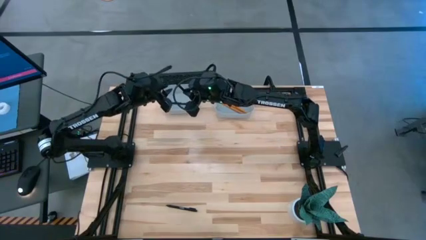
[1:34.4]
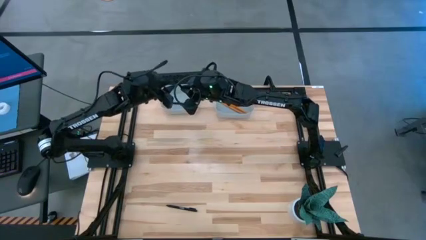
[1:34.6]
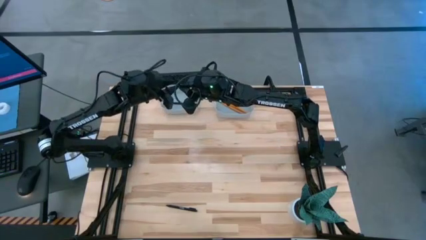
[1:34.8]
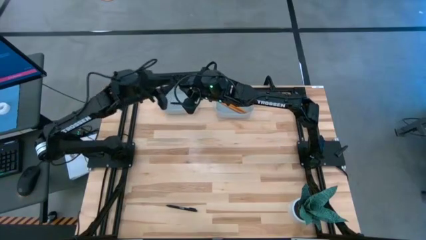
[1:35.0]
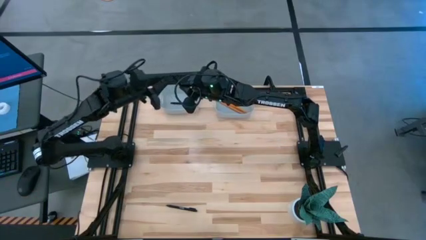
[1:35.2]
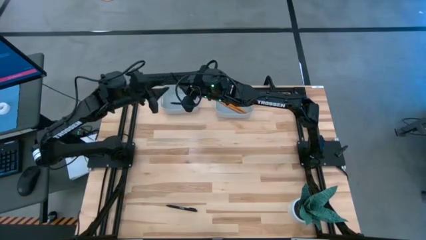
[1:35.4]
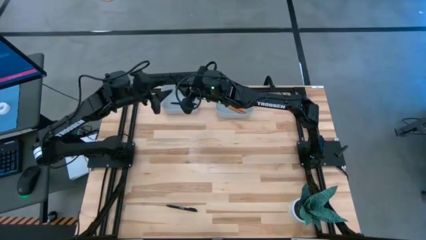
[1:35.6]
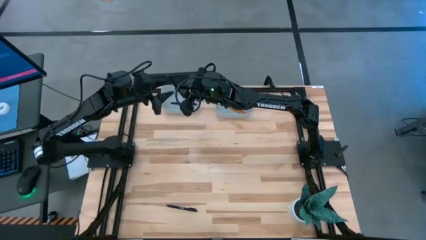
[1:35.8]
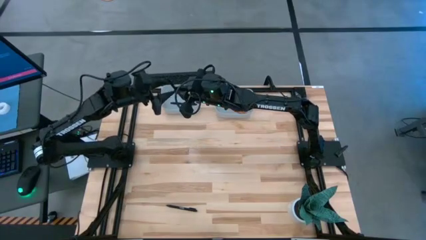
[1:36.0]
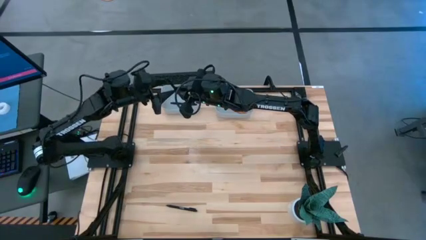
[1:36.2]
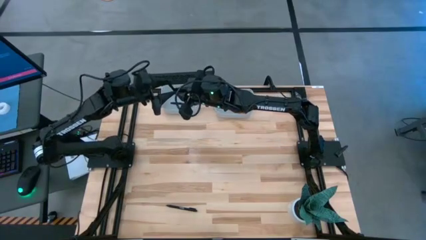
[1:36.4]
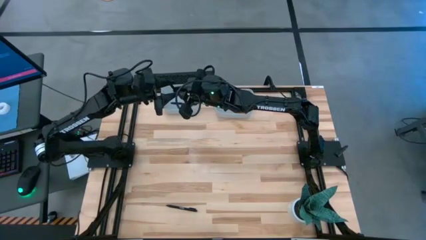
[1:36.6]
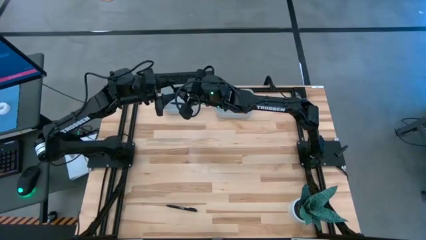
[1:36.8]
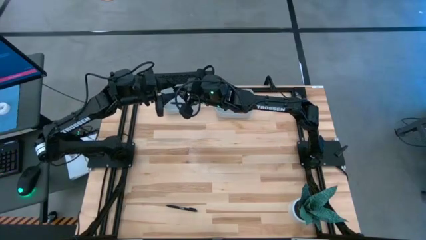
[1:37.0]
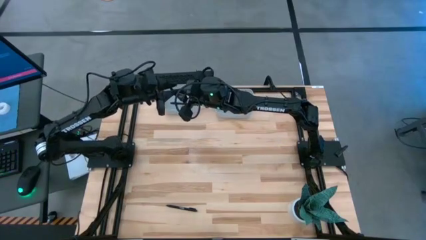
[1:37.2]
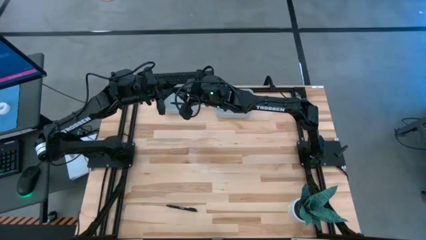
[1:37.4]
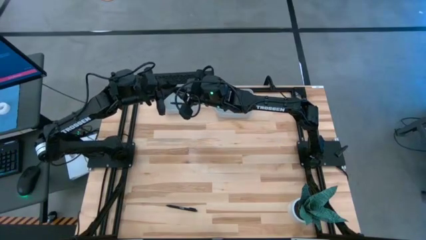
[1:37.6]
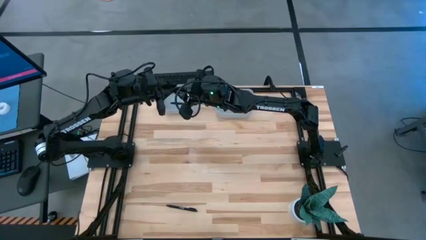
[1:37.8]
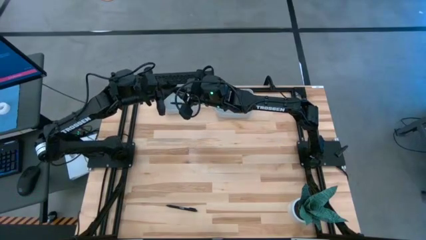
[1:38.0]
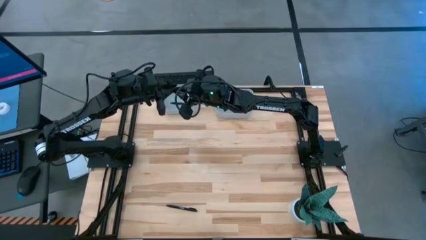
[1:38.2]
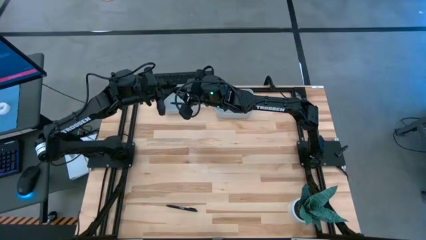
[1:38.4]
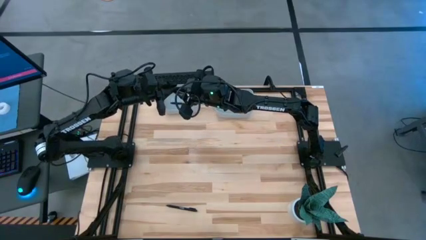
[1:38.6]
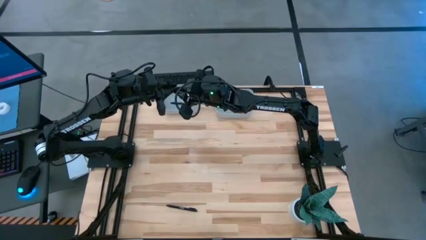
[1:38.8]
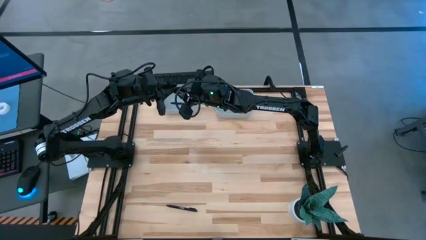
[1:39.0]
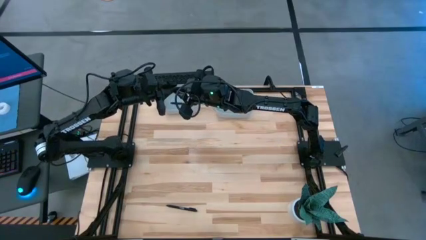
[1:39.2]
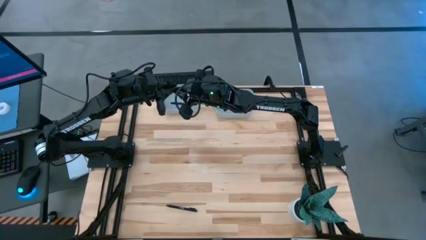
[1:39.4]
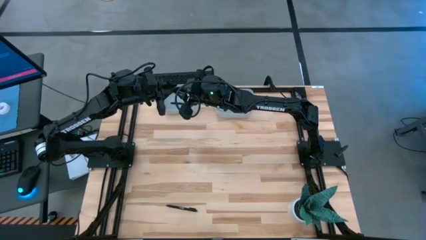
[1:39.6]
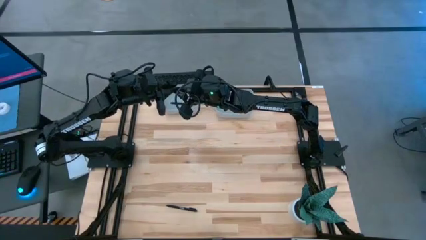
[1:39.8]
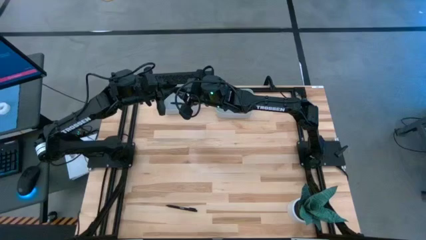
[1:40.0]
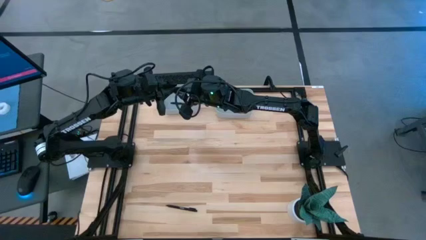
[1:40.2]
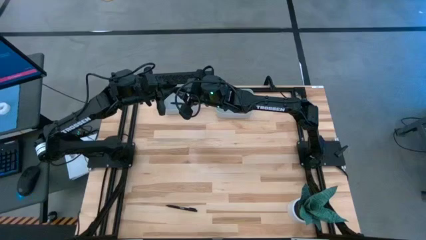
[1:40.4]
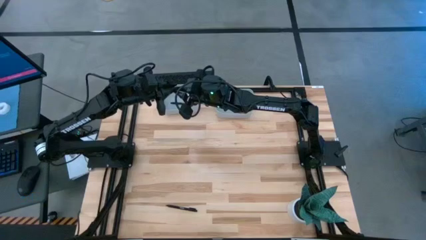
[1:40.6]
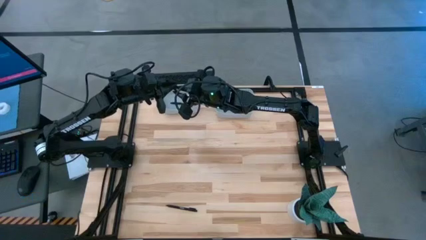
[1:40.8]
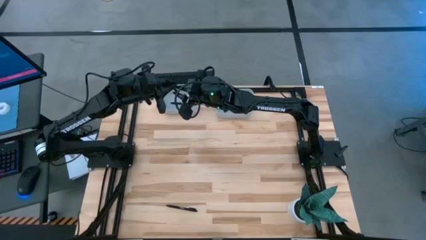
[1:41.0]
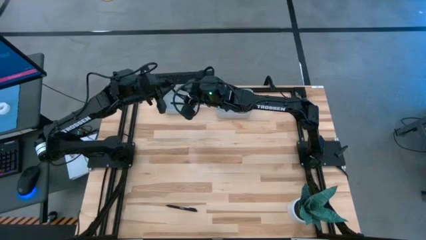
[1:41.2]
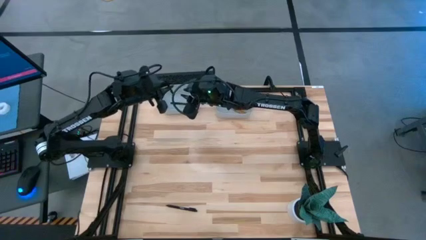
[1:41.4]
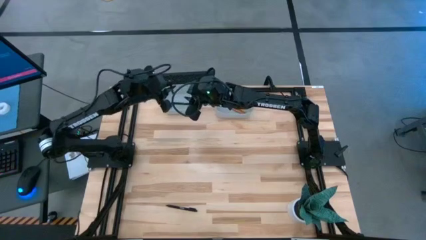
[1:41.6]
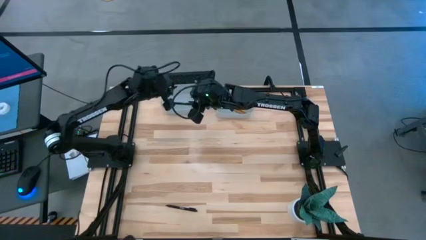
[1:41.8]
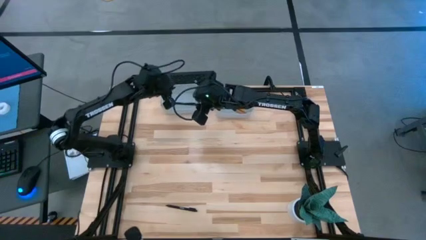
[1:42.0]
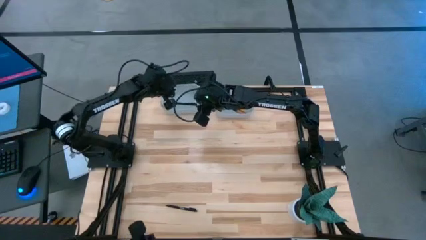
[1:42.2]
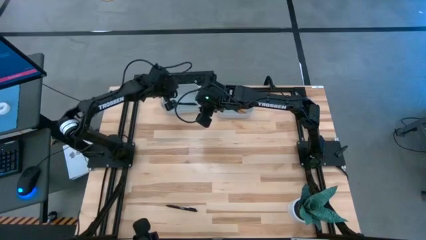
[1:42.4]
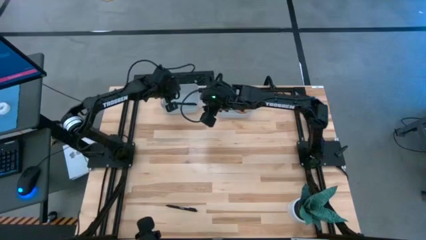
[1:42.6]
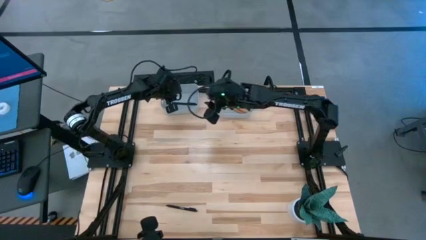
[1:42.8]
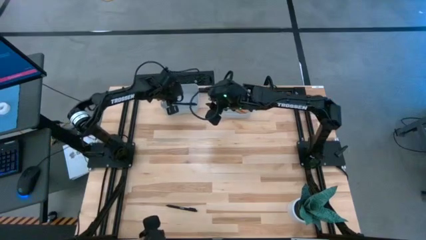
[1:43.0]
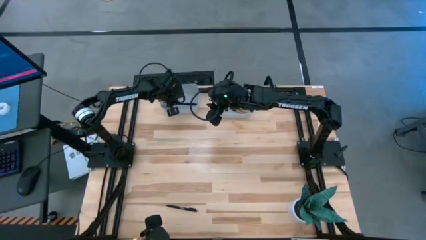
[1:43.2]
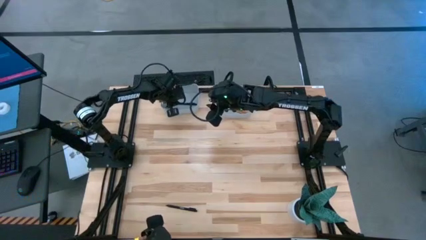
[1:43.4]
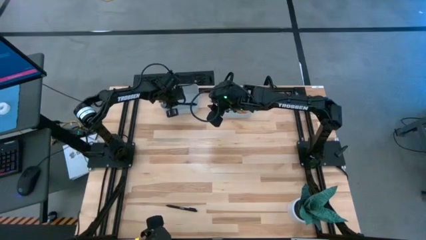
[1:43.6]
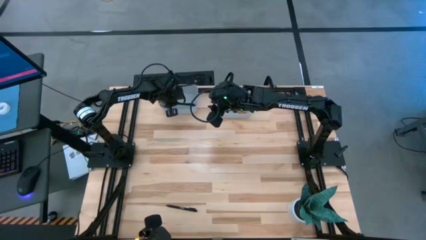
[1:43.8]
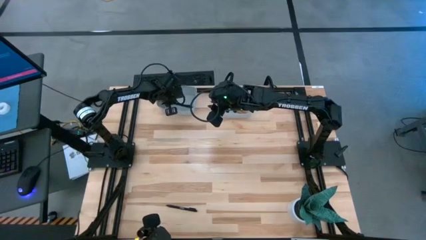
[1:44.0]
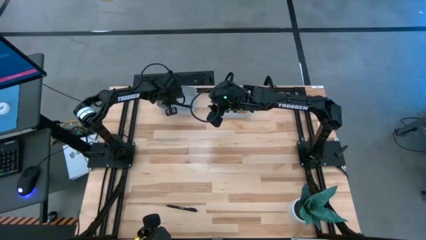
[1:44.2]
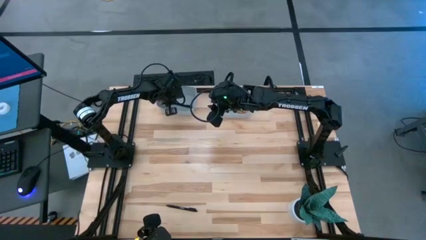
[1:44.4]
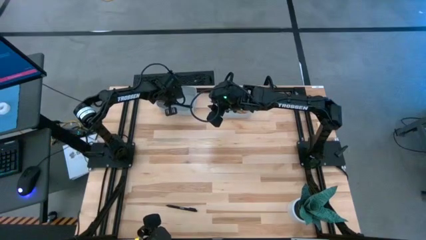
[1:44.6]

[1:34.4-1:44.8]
Task: Sort pens & pencils
Put the top black pen into the left gray bin
